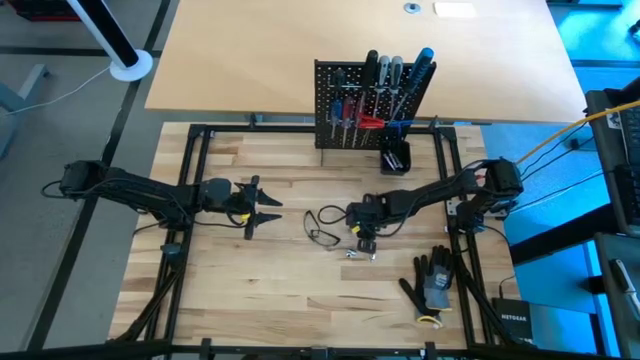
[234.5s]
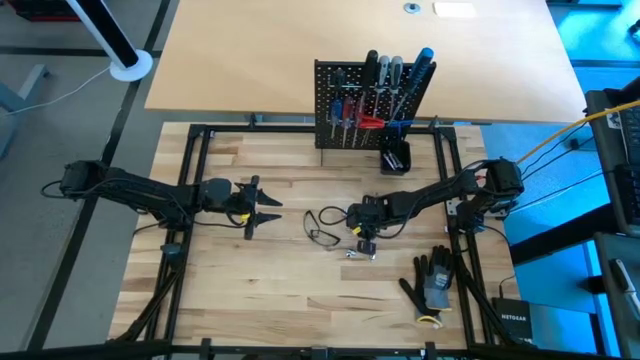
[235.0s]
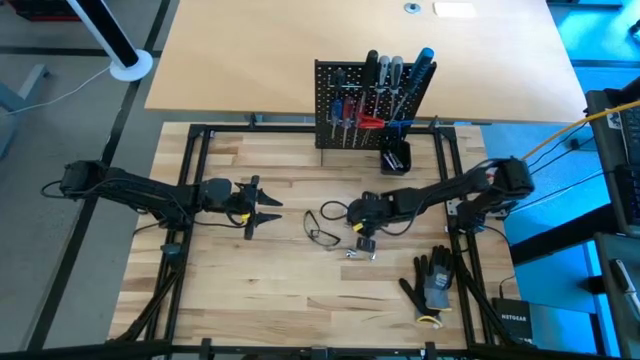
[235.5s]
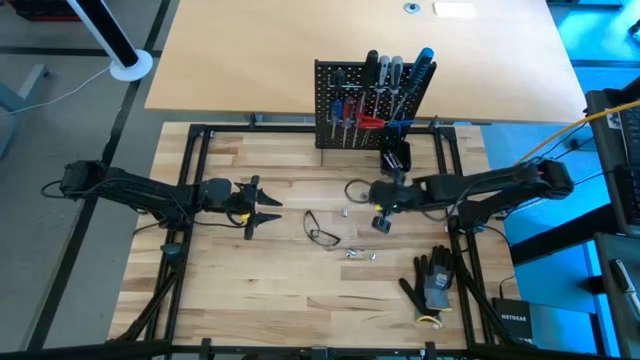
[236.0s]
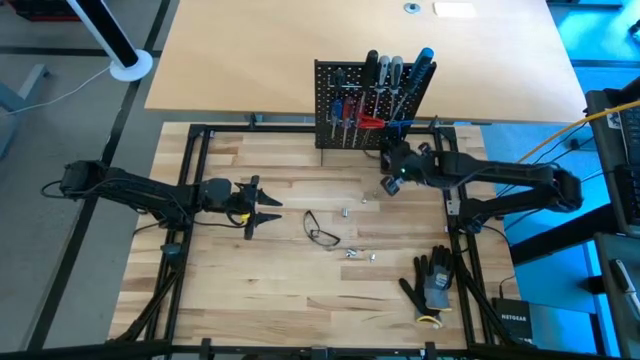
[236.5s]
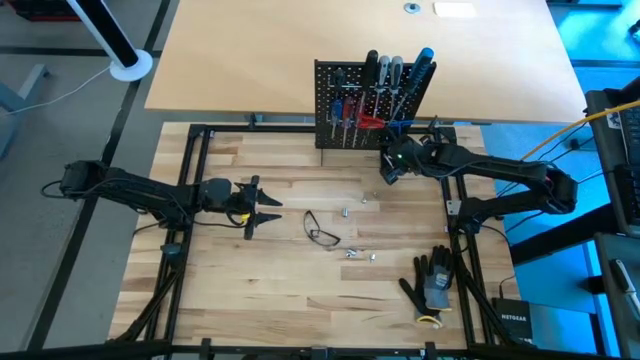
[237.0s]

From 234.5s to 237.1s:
Task: Hang tools onto peg board
Put the silver extension bar in the black bin on the peg board

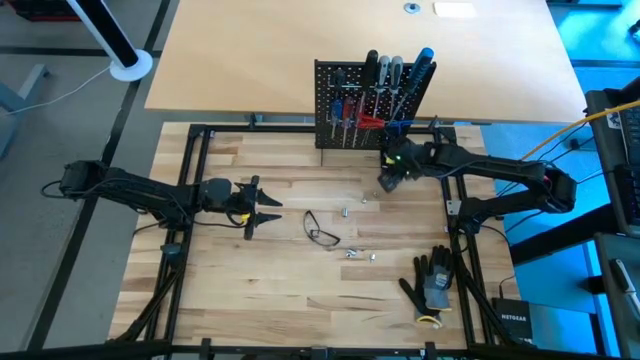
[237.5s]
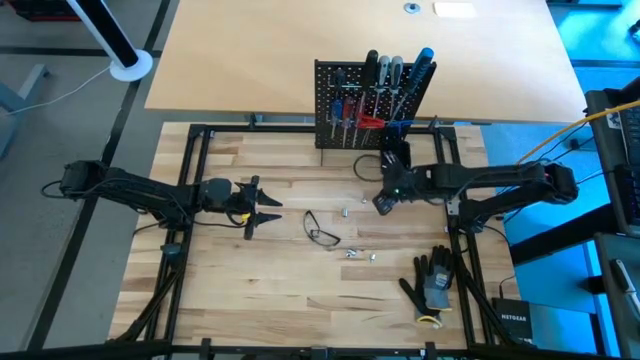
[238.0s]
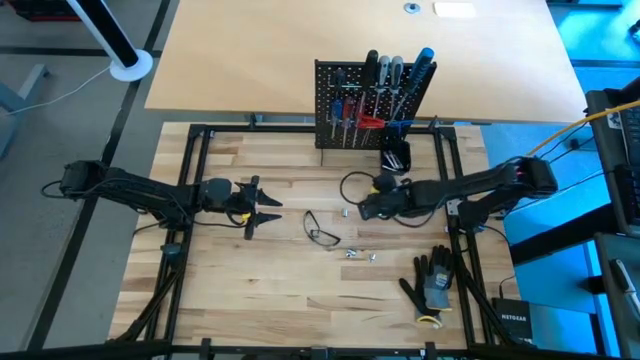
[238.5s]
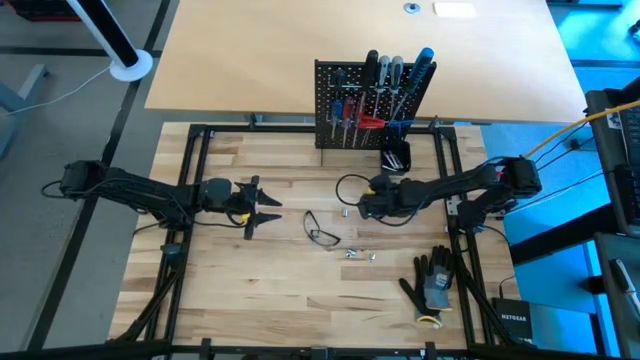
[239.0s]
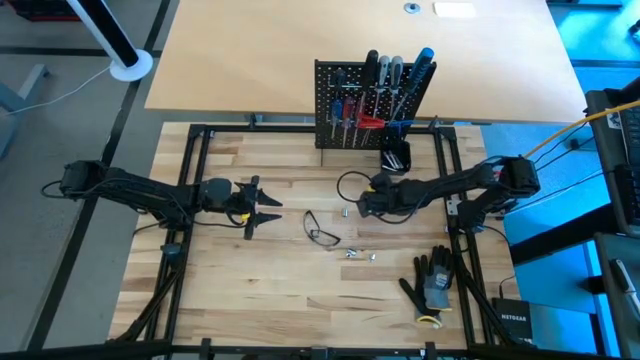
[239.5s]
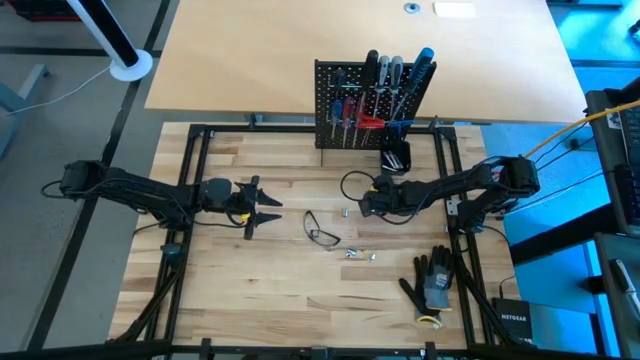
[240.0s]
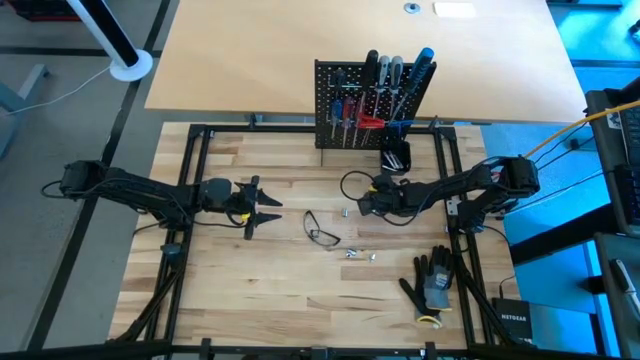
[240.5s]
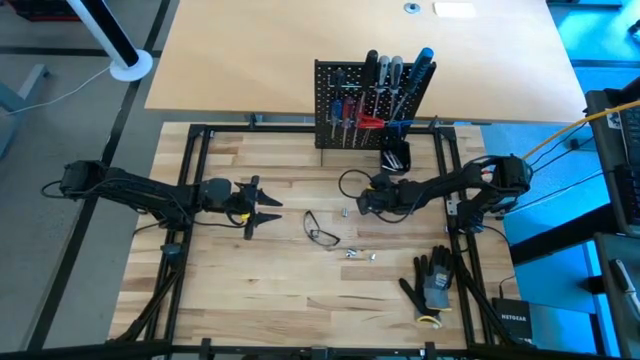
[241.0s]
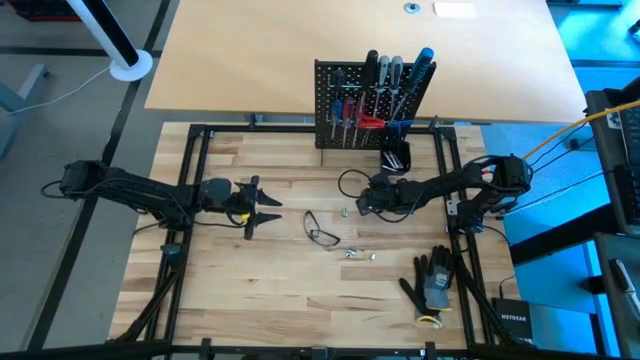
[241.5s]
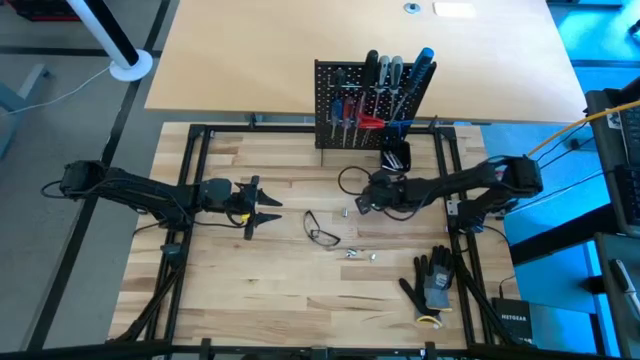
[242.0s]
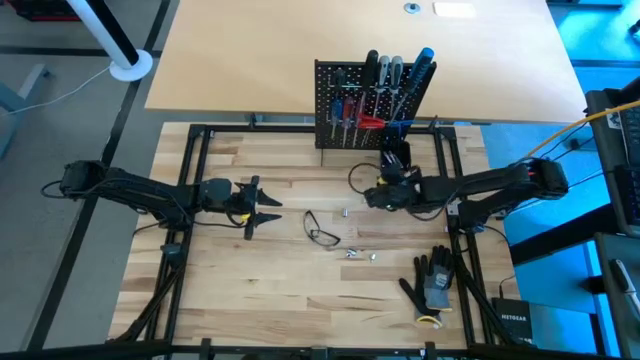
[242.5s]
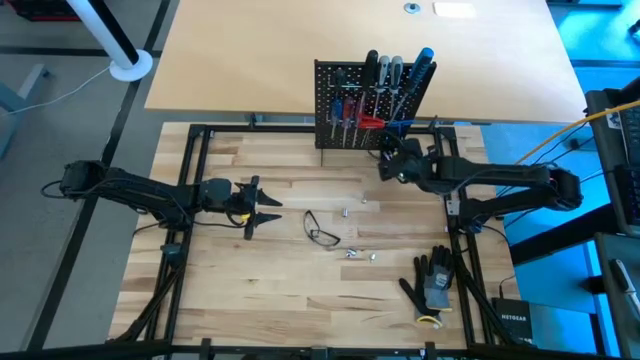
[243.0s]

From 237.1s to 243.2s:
Put the silver socket in the black bin on the peg board

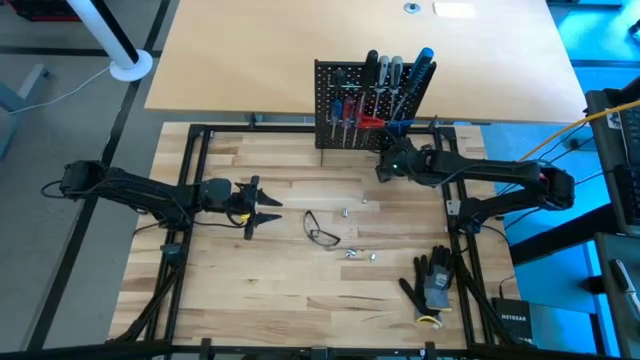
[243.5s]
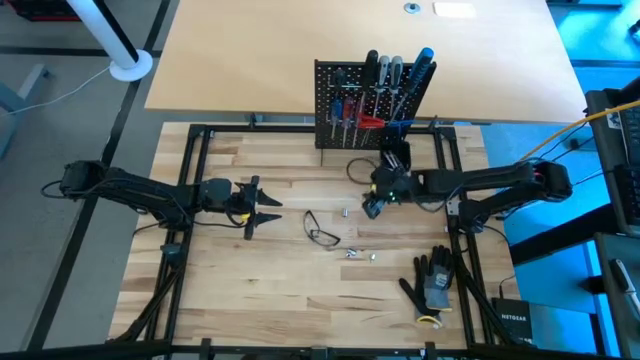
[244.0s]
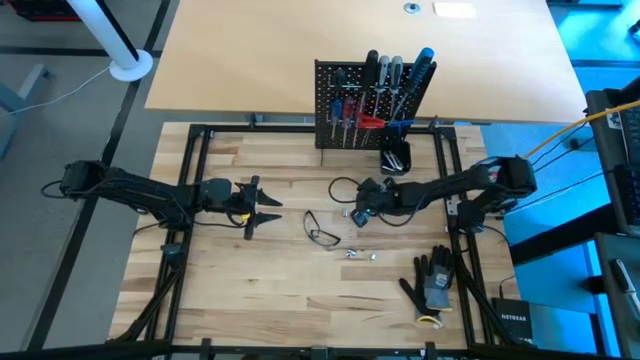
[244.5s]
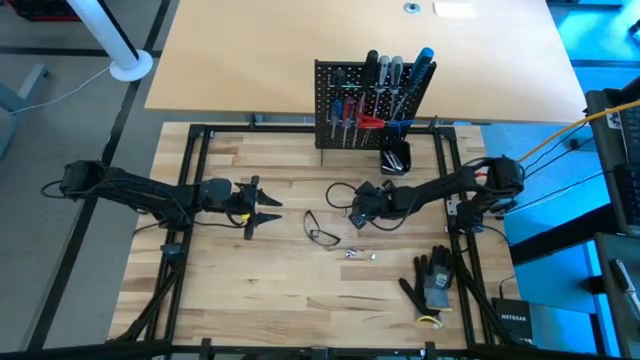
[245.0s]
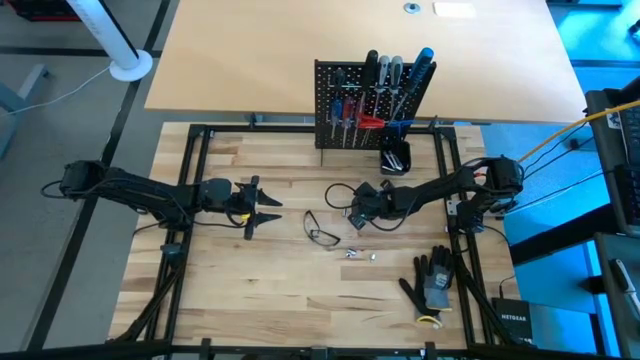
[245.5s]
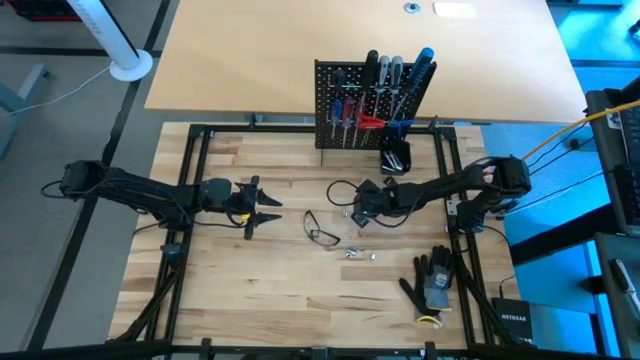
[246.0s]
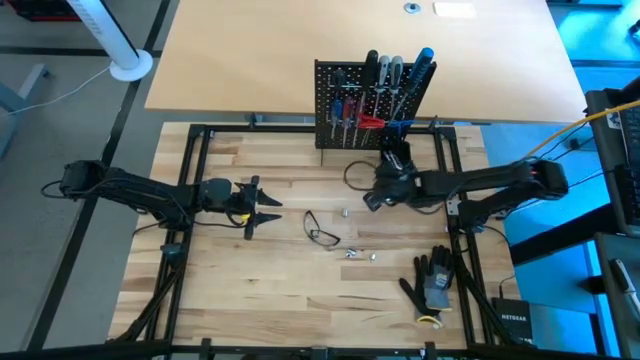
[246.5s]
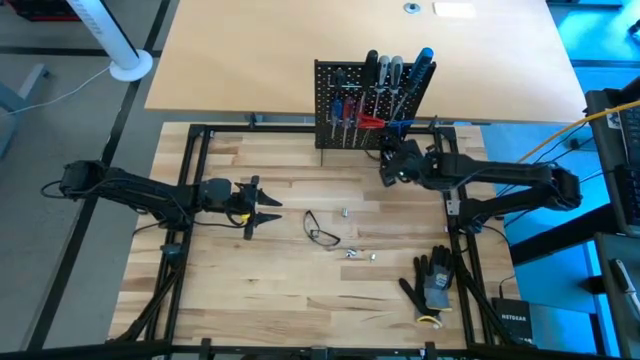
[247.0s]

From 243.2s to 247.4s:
Put the silver socket in the black bin on the peg board

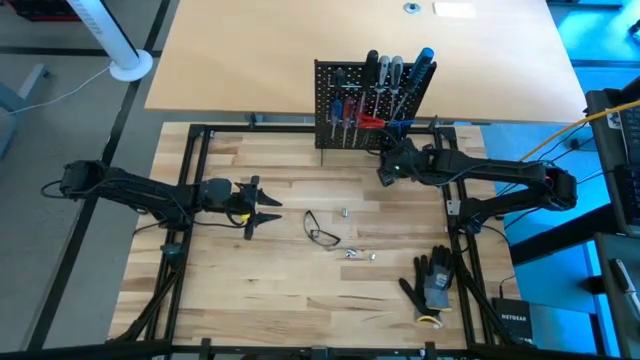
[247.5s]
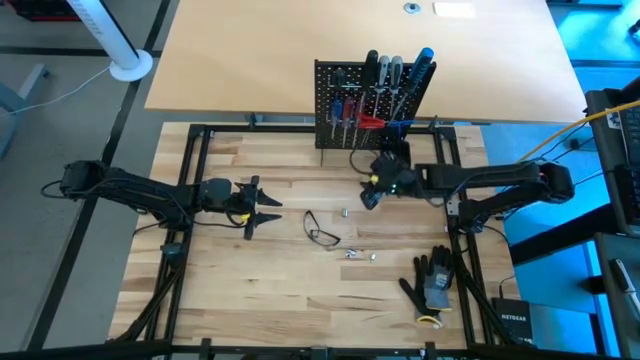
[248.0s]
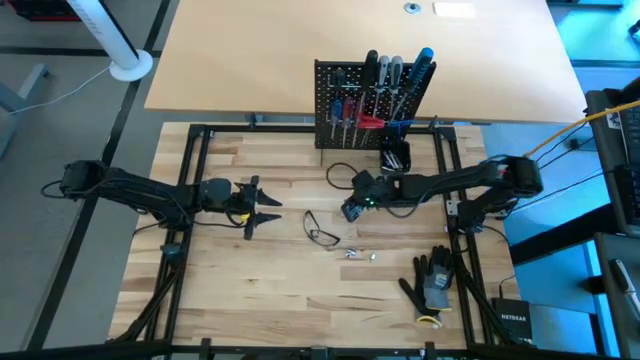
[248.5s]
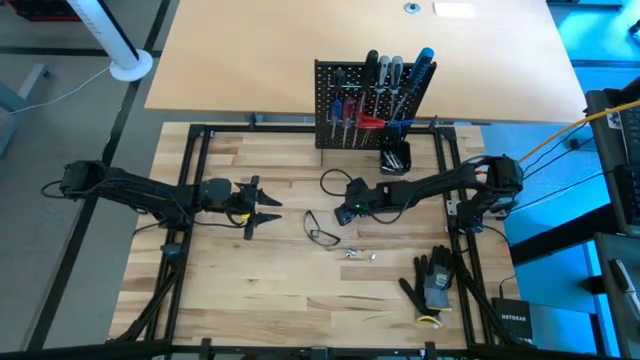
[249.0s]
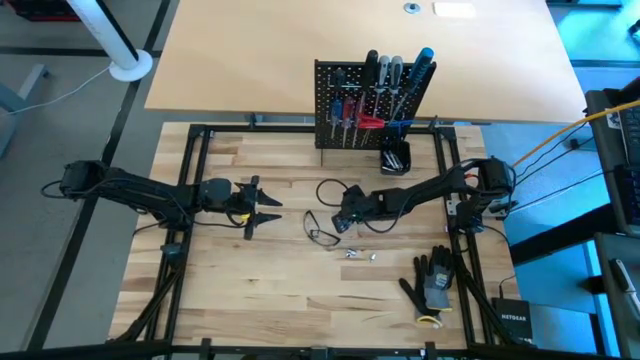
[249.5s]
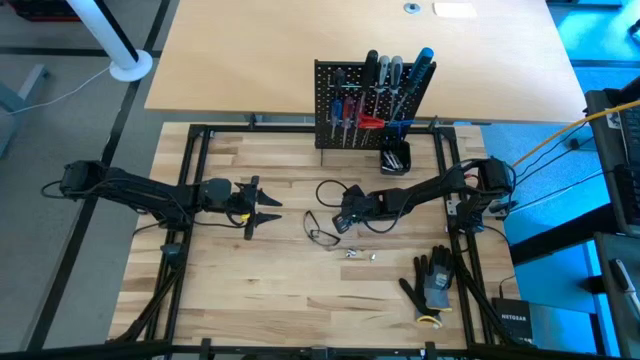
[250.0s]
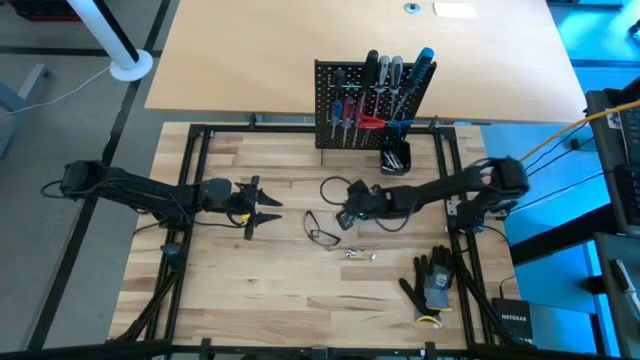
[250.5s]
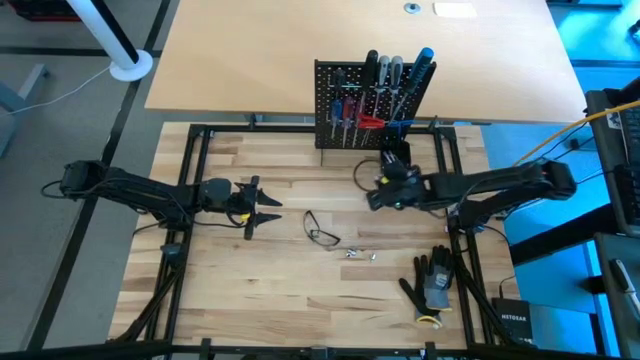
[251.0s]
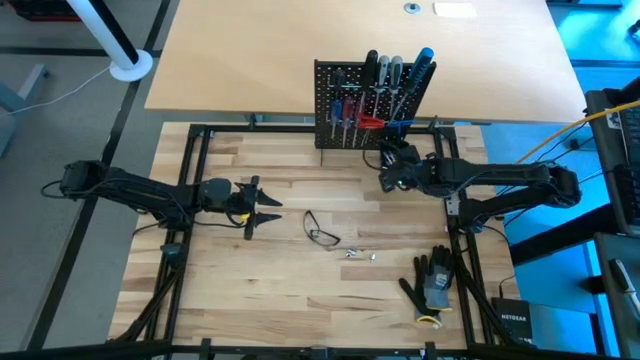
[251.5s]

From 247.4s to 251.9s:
Put the silver socket in the black bin on the peg board

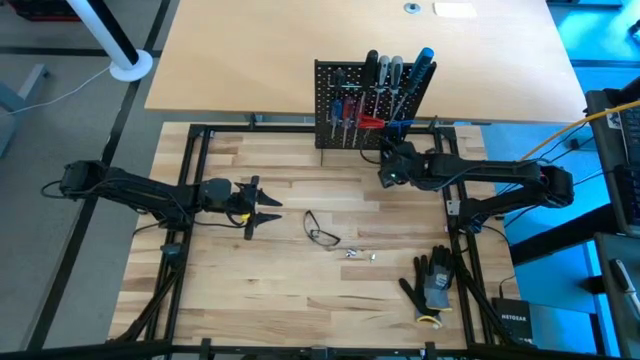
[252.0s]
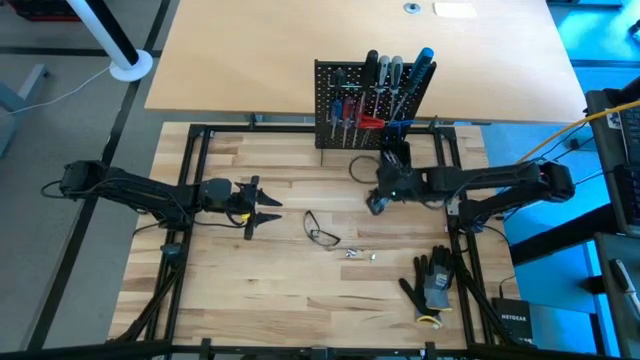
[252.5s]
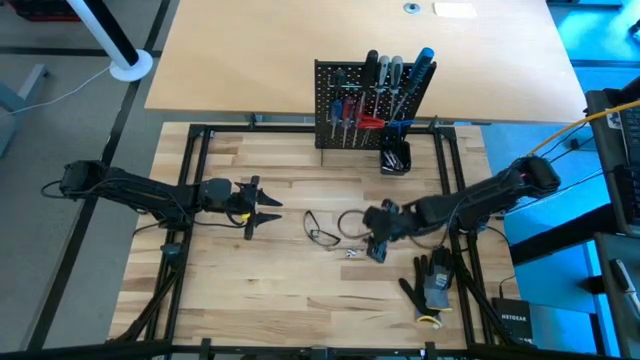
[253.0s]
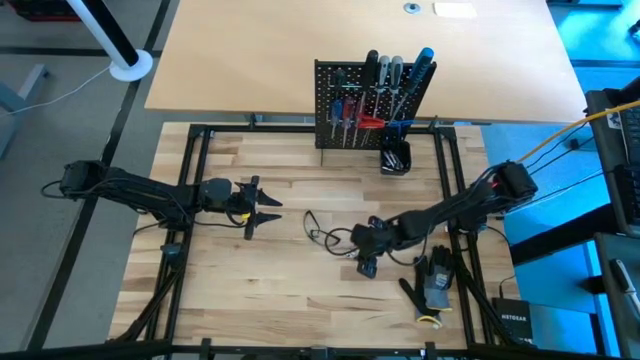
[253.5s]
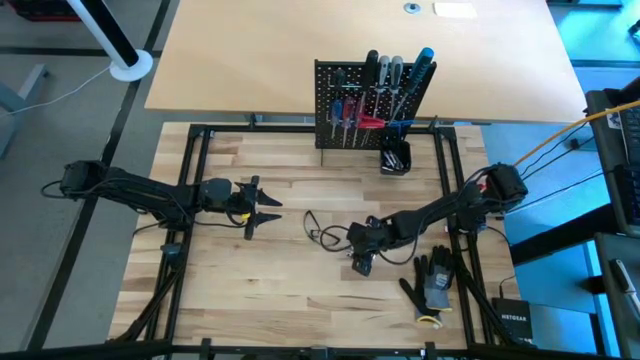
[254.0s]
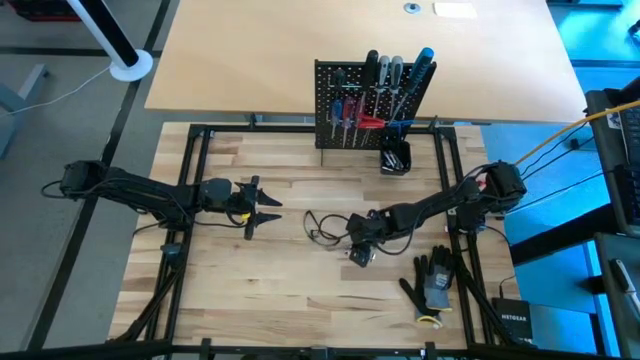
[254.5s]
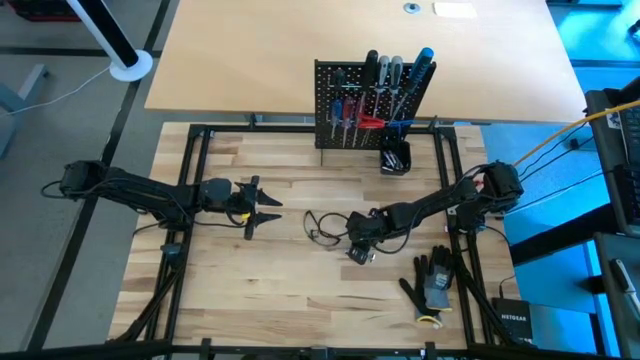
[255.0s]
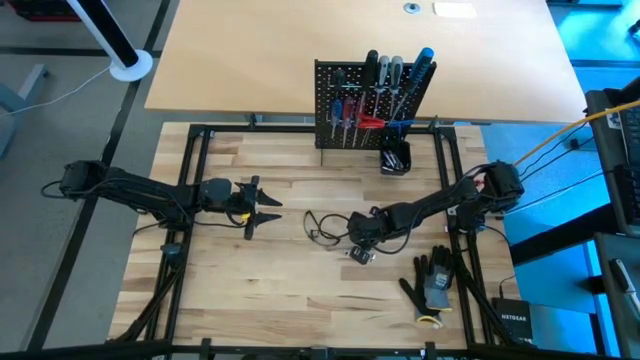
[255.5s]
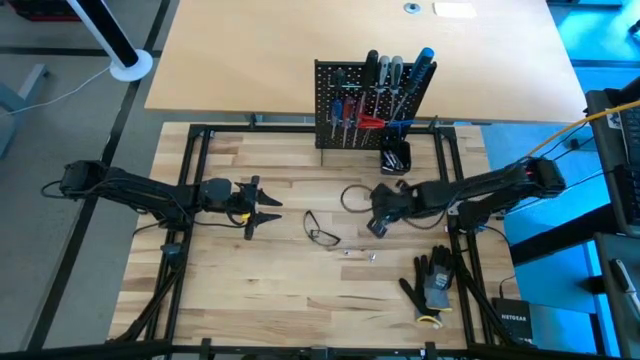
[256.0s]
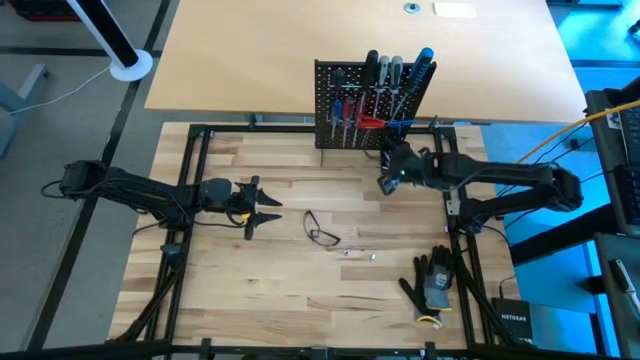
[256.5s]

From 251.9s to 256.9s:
Put the silver socket in the black bin on the peg board
